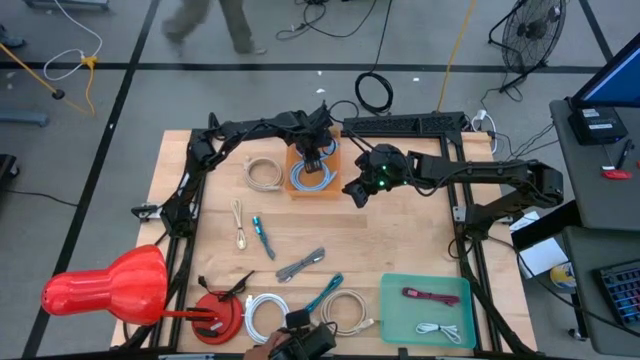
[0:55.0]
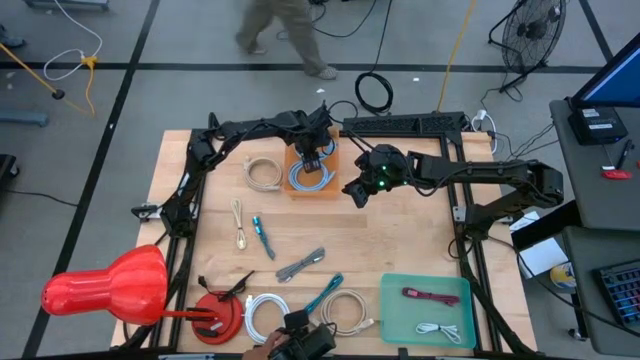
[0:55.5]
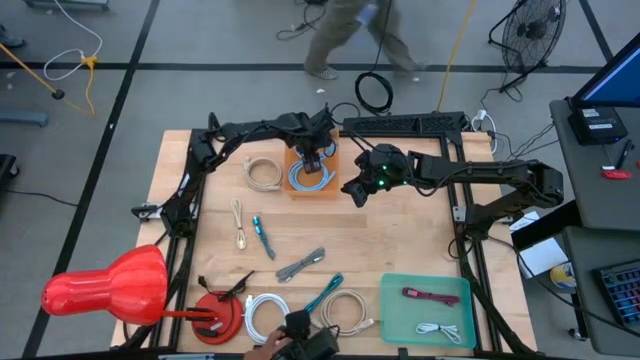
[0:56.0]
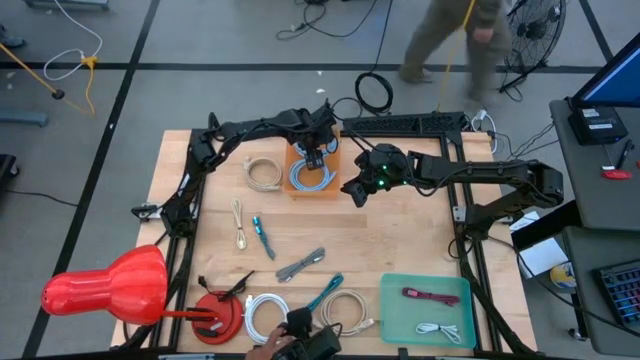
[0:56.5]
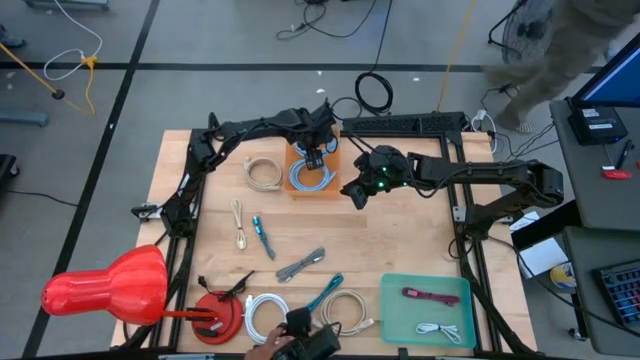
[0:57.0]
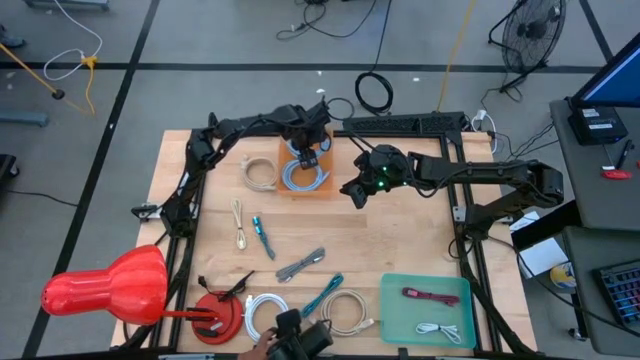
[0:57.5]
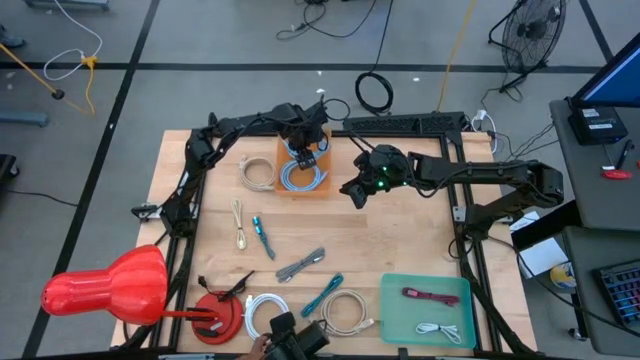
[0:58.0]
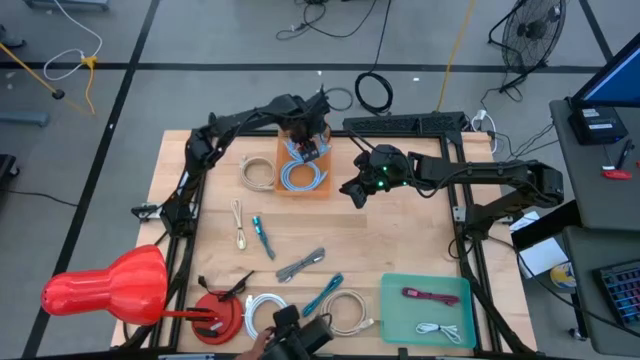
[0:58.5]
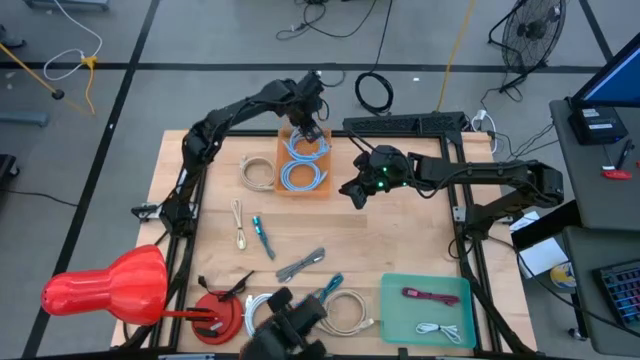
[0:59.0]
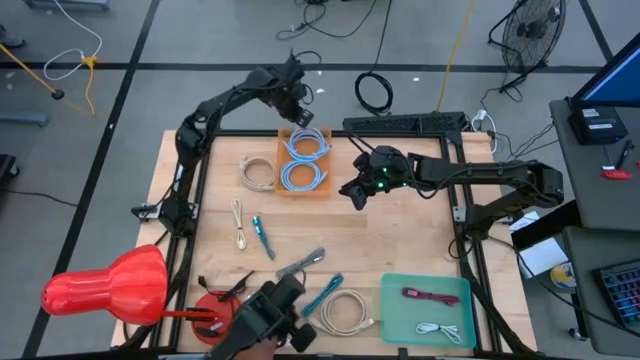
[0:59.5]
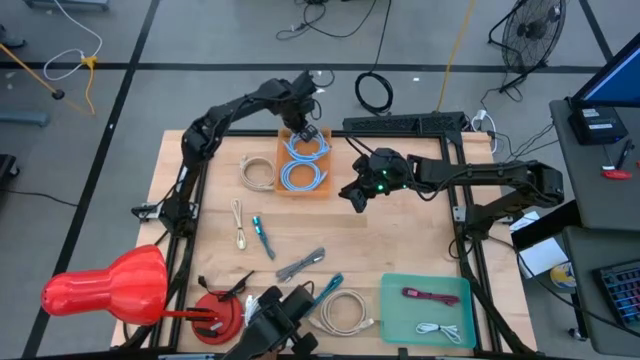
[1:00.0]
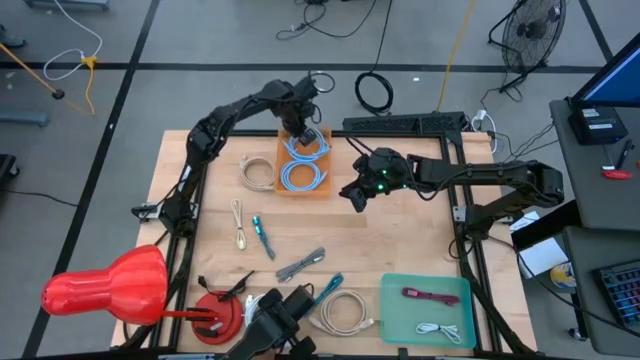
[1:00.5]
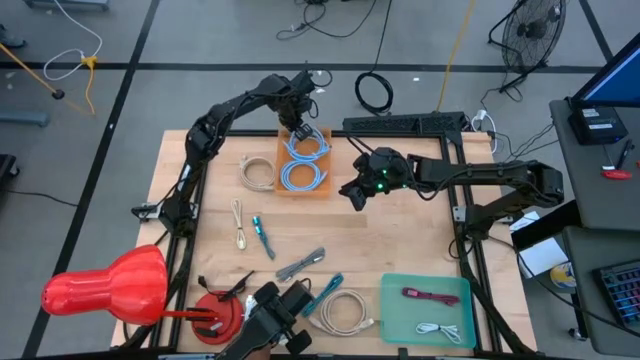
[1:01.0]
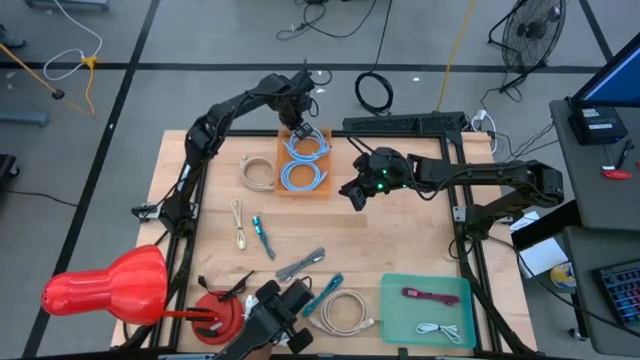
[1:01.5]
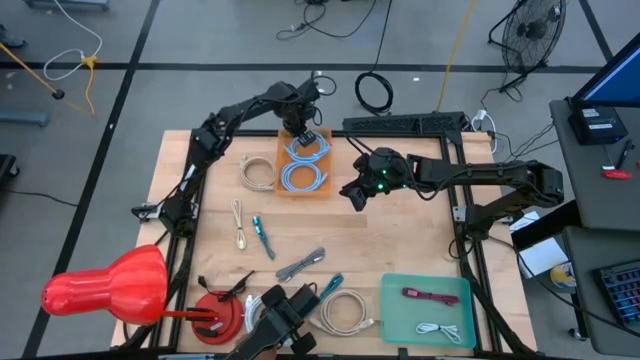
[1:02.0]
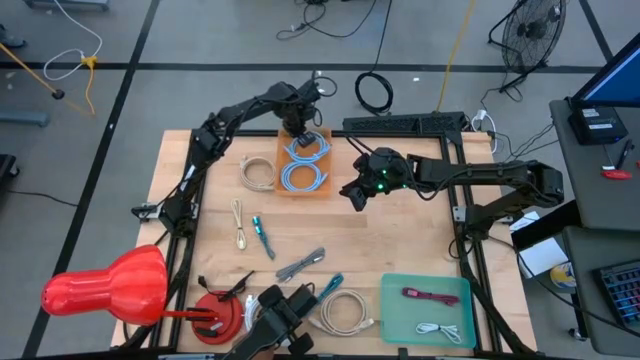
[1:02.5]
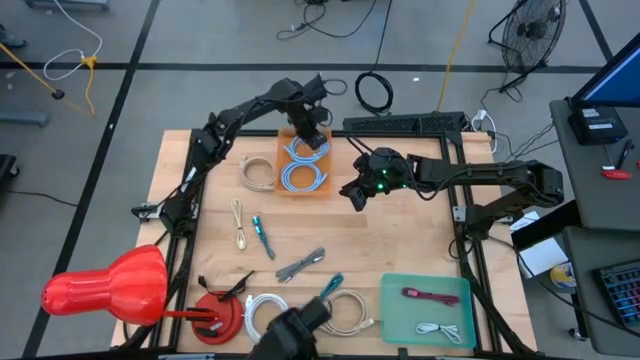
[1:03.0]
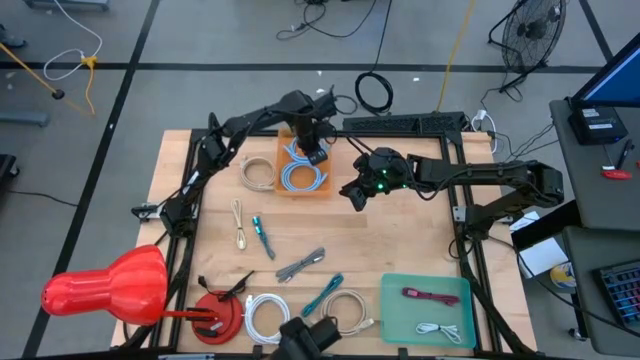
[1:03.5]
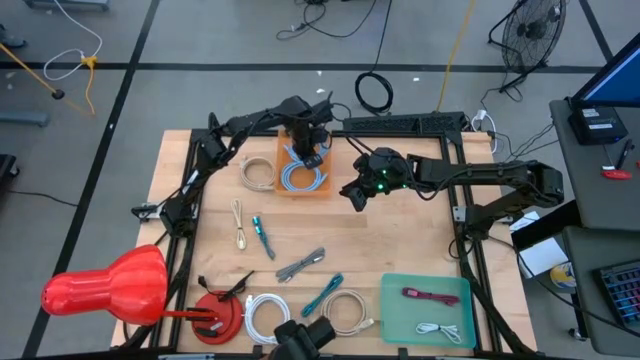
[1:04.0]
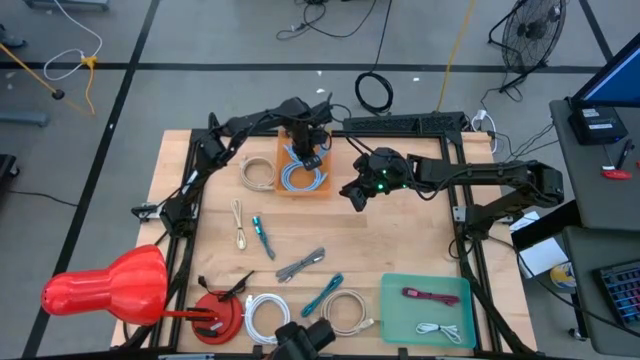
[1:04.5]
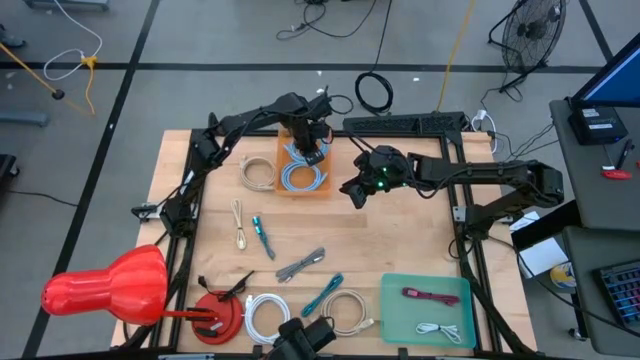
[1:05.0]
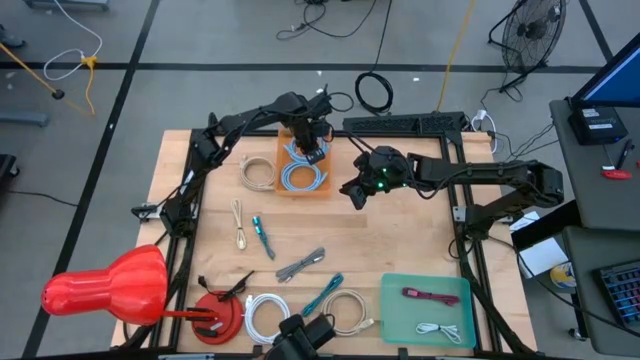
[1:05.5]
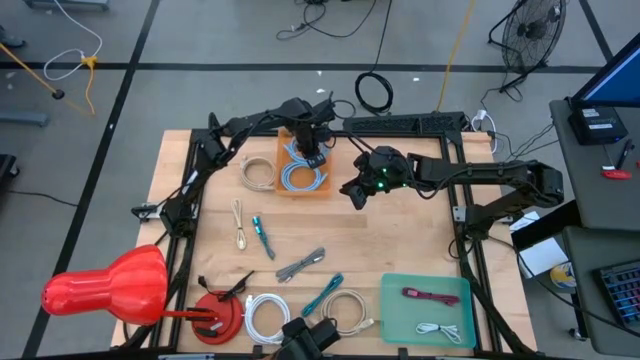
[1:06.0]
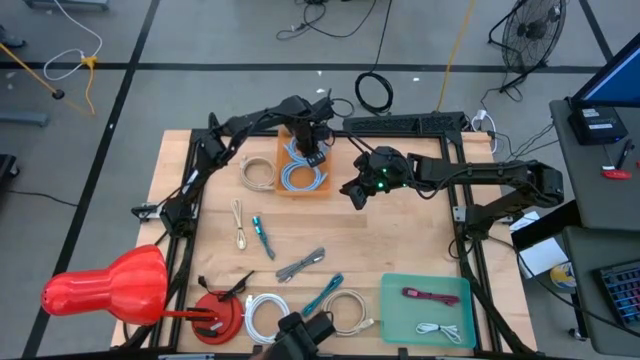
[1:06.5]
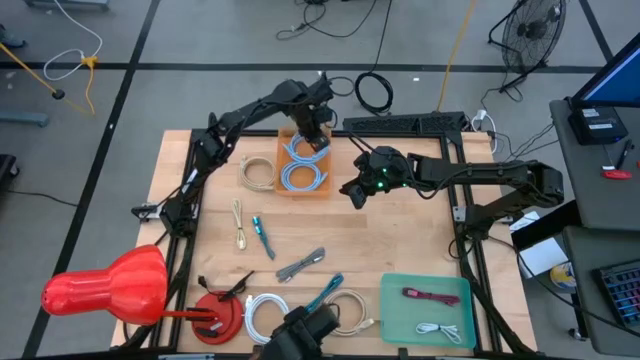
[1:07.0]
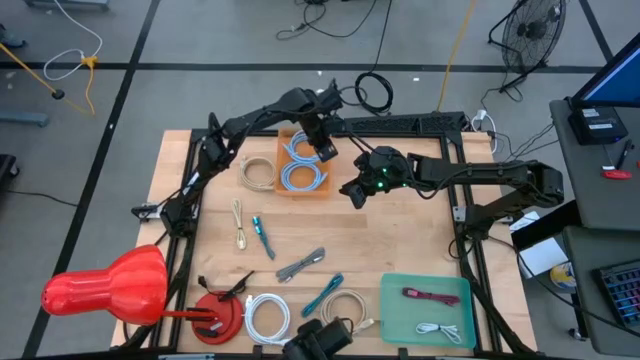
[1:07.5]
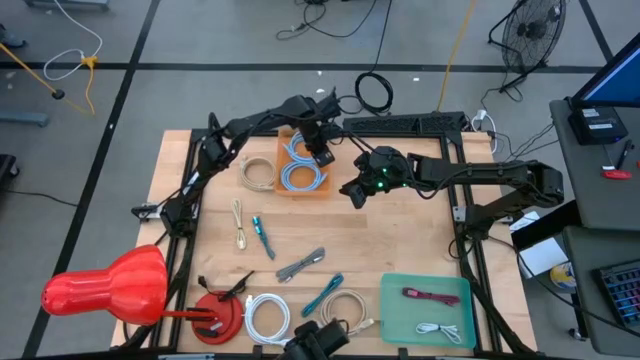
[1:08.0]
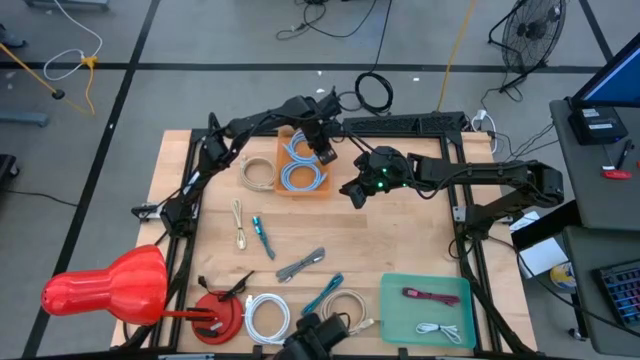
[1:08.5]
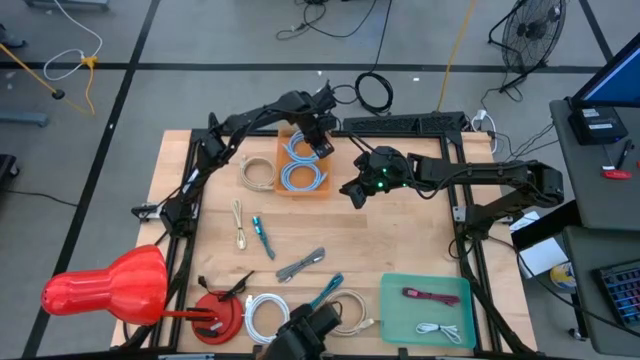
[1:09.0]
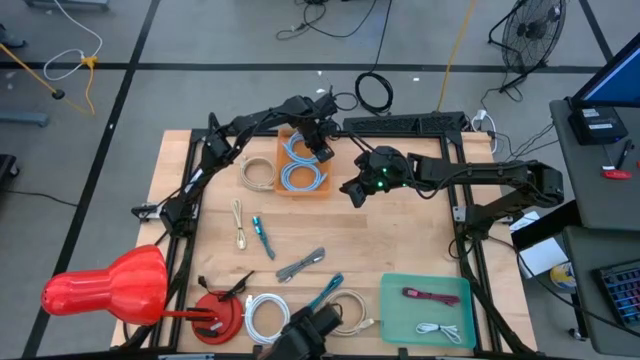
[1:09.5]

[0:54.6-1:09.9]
Task: Pick & Place USB Port
Put the blue usb cable into the orange bin
